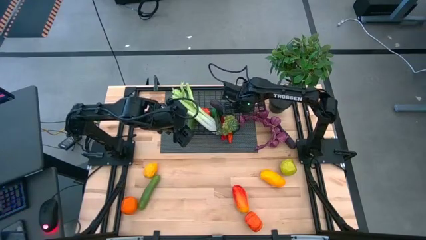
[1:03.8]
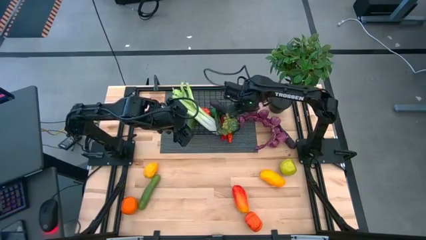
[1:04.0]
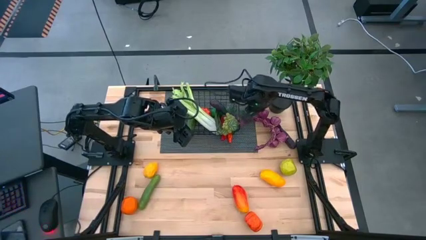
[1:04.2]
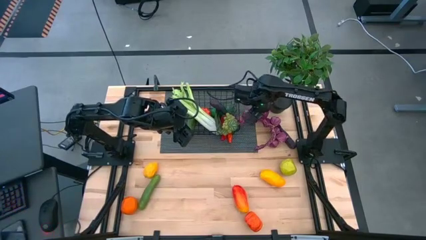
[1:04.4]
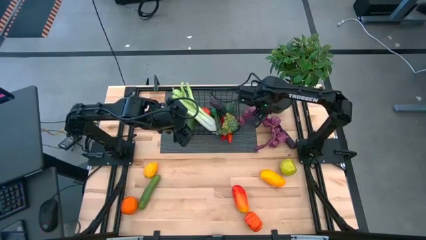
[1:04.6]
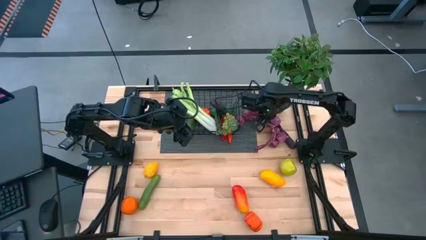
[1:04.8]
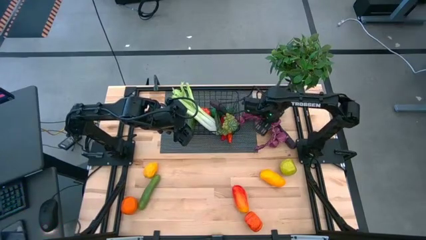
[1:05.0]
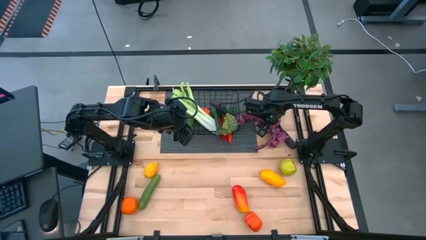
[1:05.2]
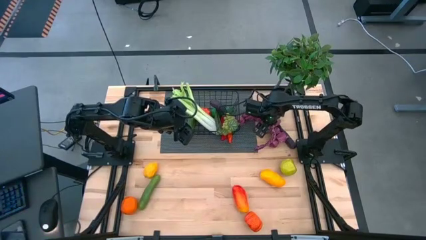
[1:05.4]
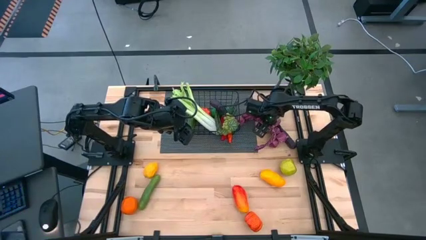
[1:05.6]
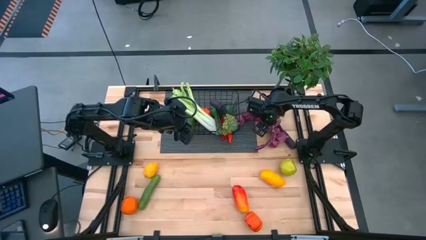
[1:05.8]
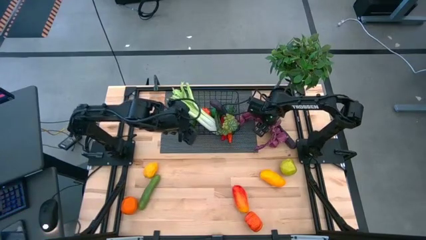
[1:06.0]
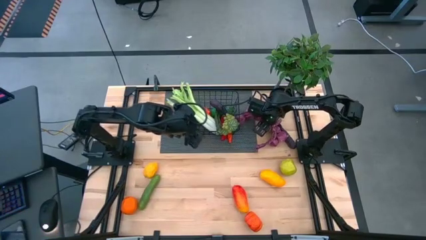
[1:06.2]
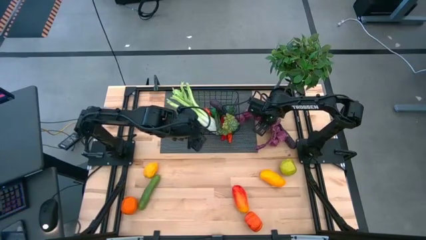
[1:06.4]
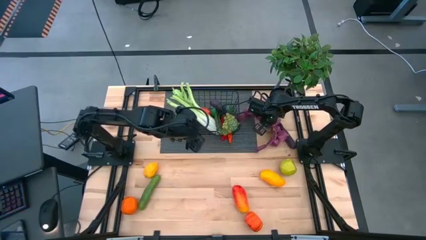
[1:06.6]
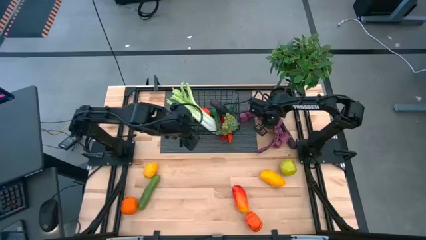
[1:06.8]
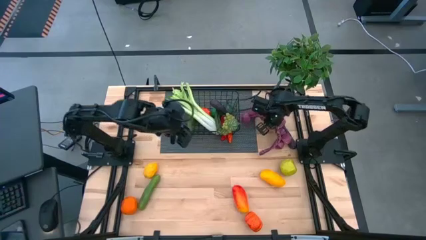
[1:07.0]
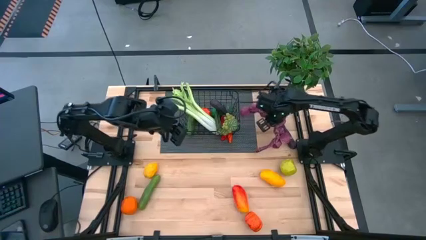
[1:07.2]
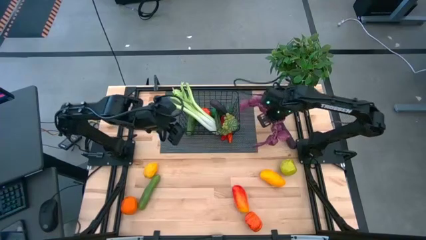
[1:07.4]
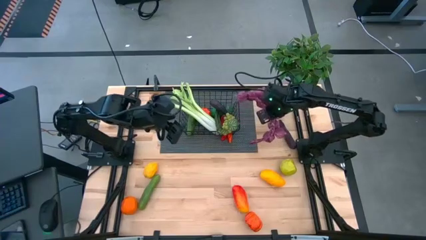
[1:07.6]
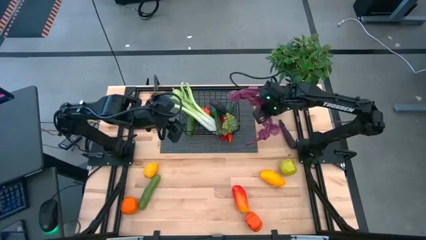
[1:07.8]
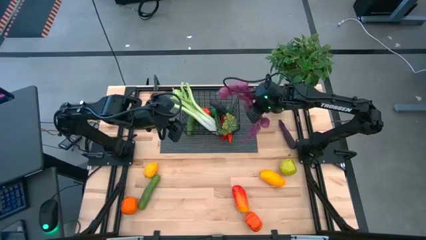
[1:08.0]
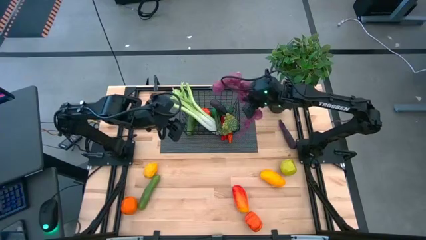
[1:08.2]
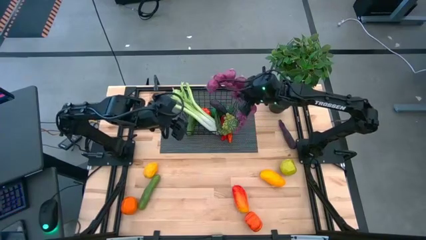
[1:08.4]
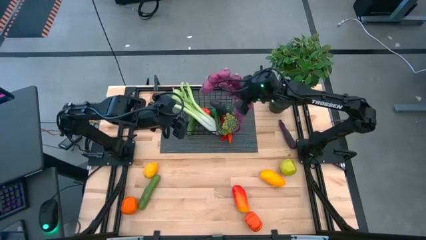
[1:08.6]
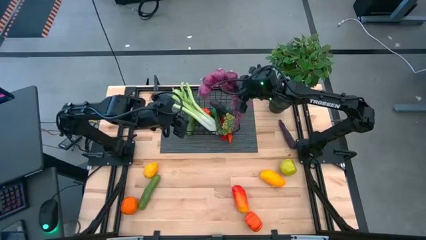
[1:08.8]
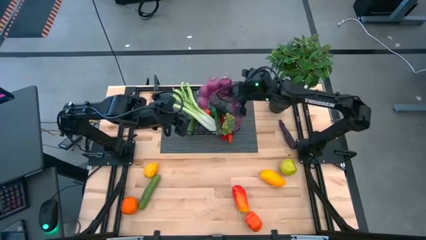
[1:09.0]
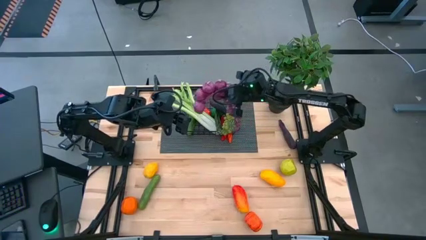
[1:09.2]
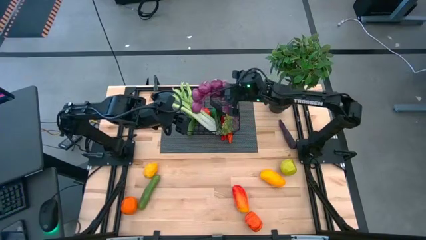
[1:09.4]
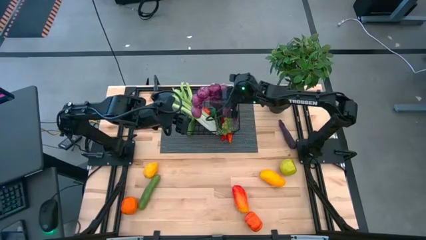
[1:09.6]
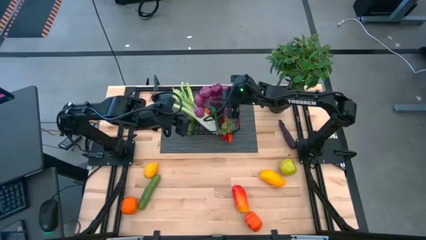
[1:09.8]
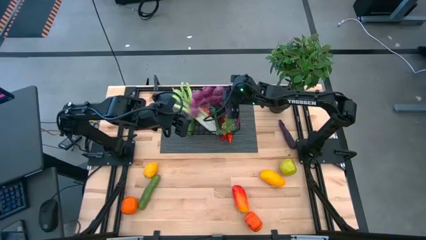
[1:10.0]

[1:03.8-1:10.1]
Task: Build produce basket
Put the purple garlic into the wire basket

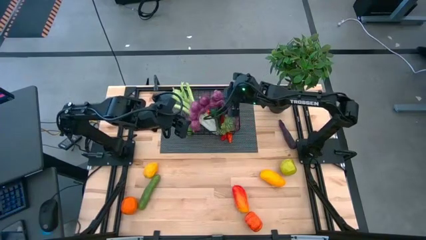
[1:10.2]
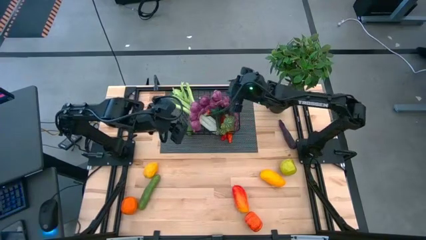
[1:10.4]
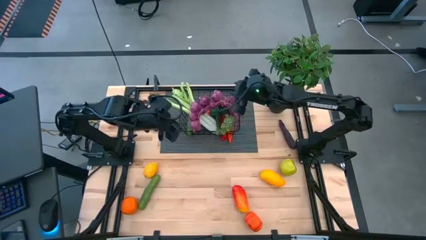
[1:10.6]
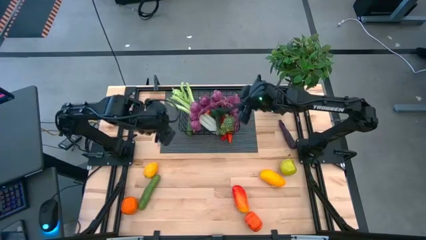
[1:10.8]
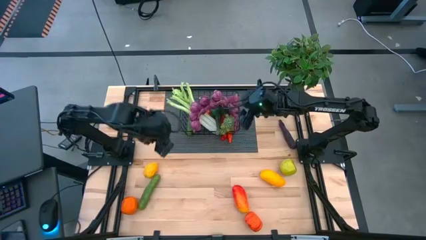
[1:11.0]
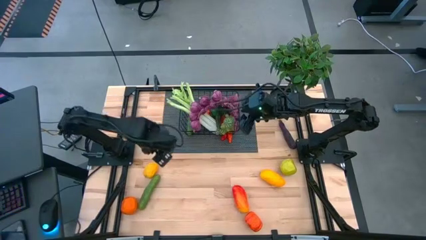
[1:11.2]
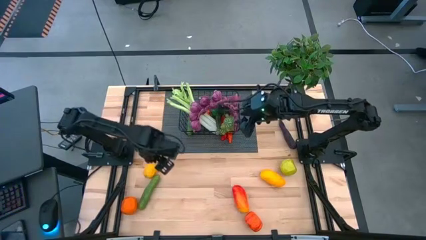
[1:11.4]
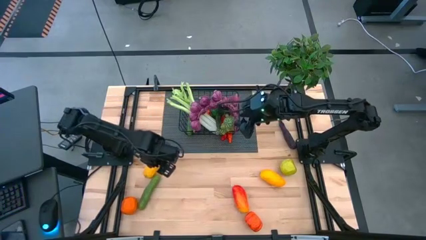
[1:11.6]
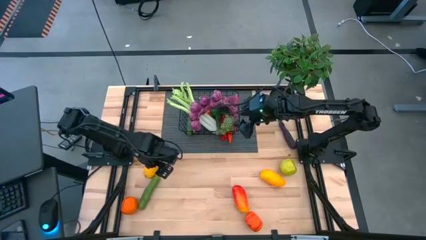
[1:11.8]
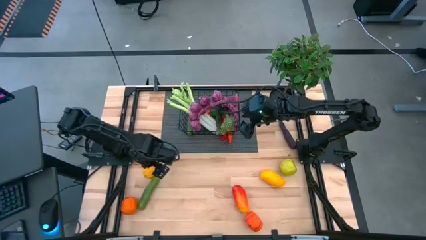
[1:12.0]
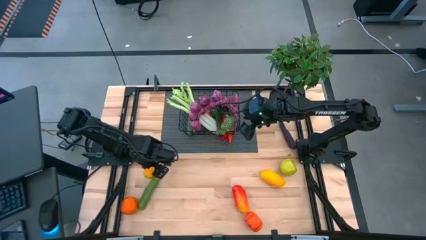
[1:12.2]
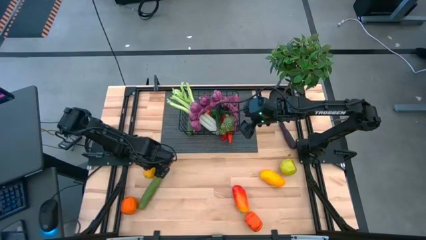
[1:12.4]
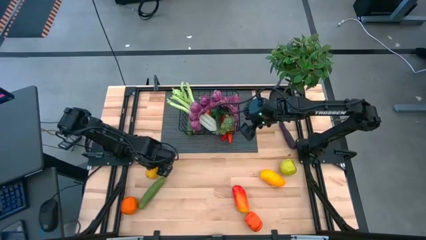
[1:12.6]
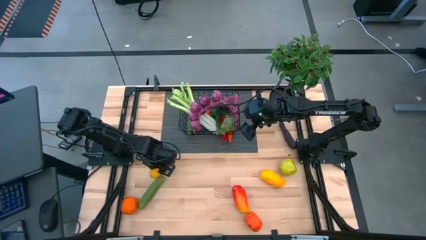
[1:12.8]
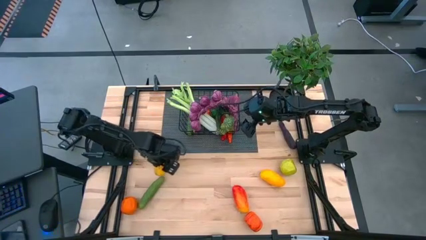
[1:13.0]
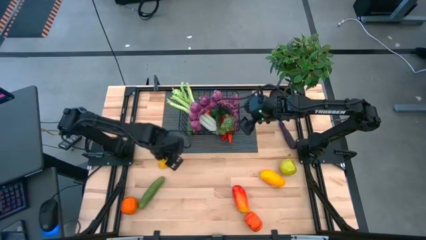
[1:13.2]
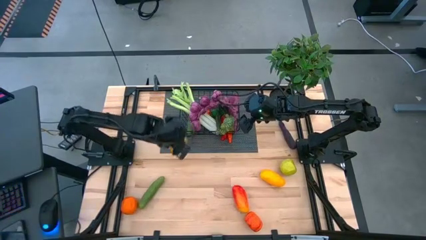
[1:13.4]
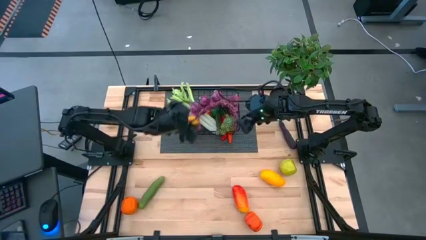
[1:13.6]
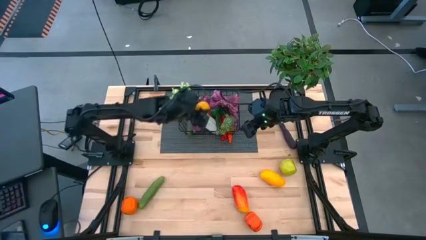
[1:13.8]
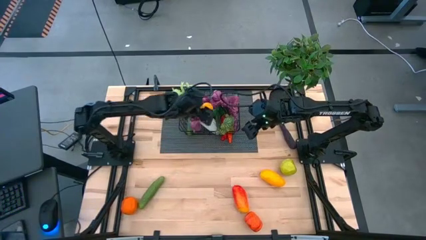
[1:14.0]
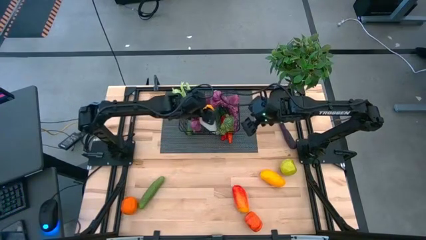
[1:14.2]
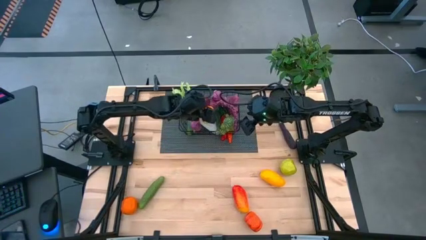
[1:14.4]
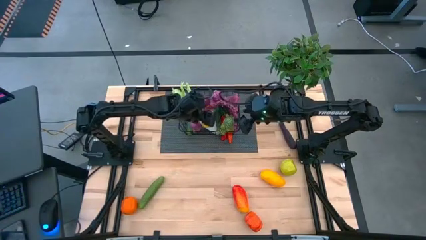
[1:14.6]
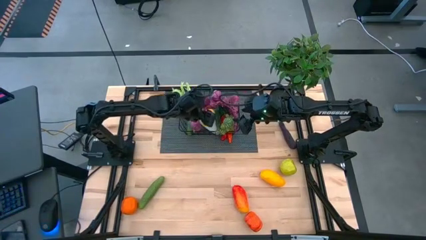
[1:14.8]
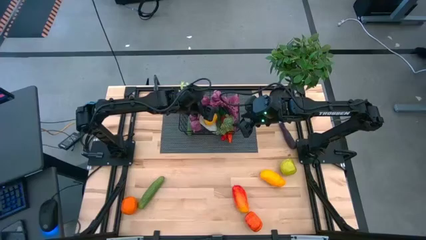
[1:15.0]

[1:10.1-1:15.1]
Put the lemon into the wire basket

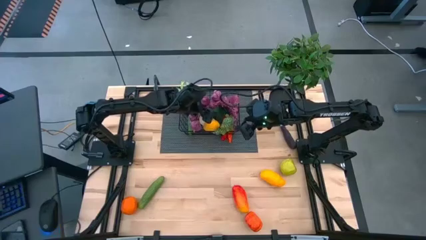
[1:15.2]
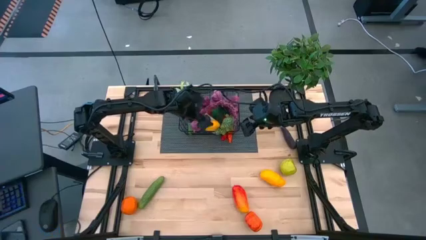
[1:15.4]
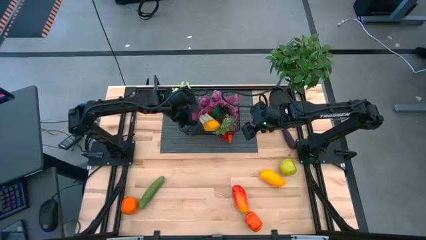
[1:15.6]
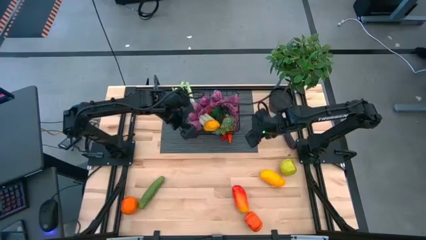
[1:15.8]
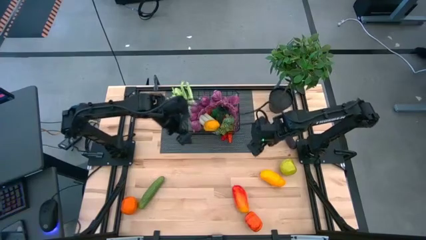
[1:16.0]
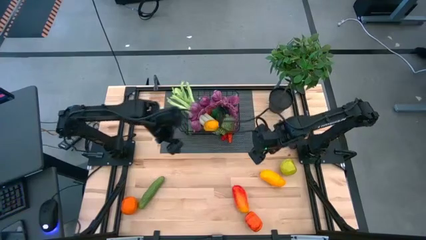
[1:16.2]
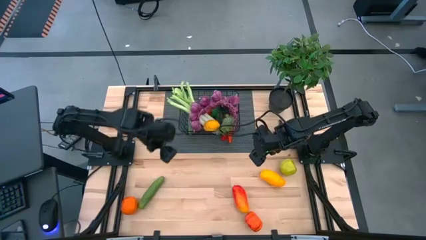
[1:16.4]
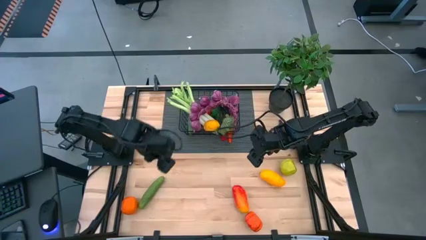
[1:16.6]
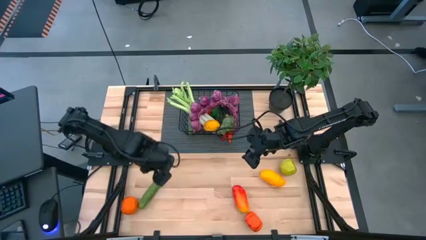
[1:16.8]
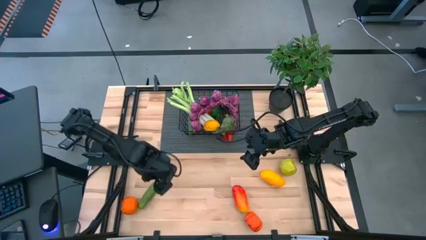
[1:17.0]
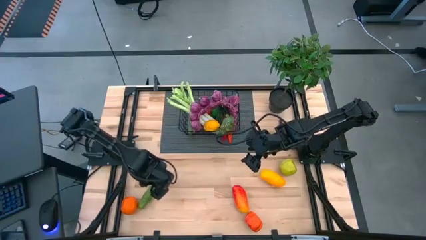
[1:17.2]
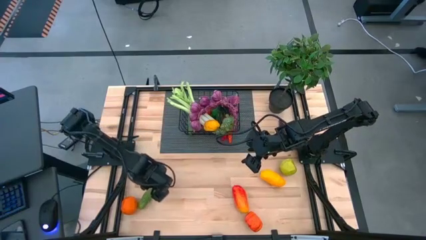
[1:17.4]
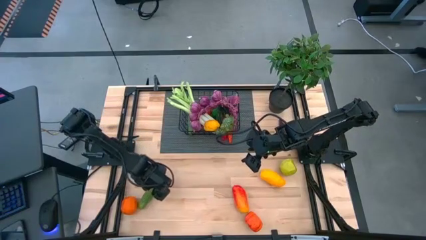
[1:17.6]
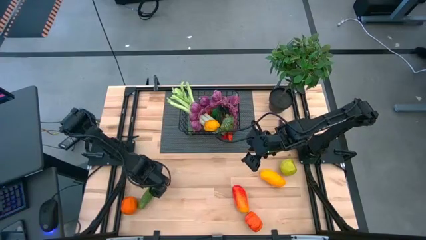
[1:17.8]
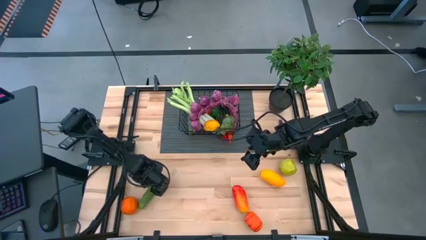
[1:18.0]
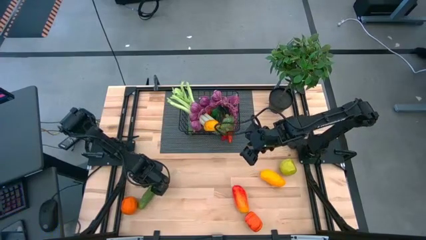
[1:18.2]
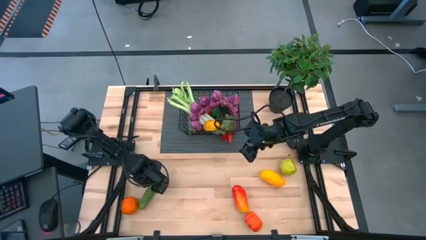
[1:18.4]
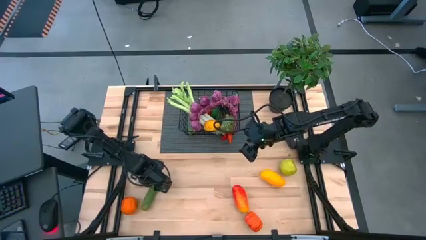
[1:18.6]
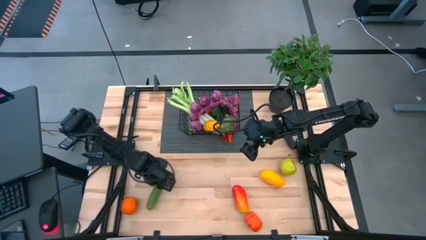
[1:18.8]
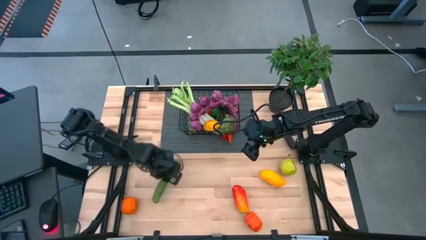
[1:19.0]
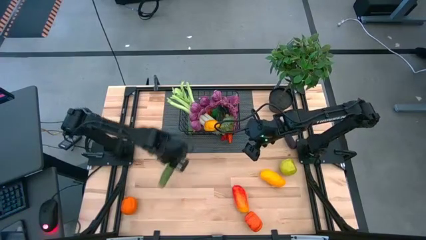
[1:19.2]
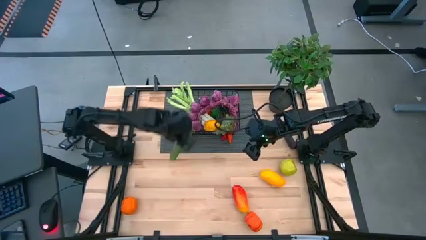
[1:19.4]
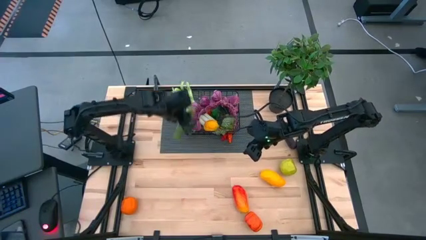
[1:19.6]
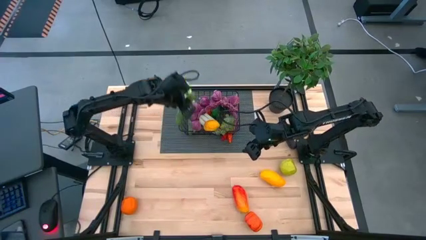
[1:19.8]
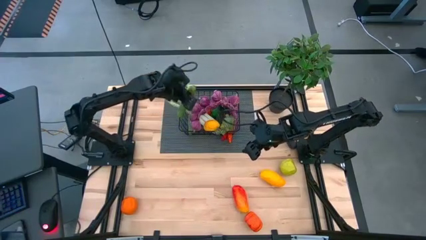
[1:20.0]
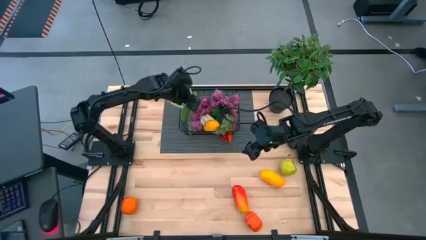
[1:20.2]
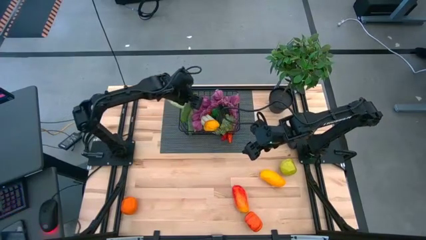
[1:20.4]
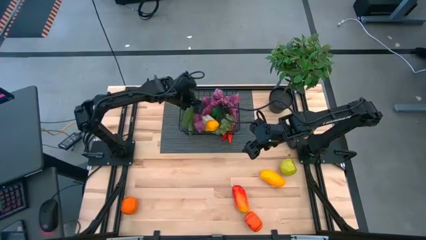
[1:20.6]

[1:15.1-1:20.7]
Put the cucumber into the wire basket

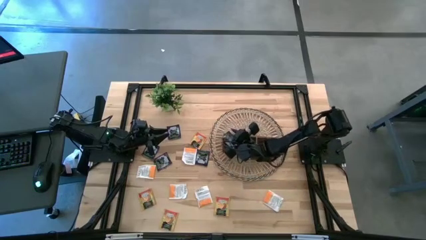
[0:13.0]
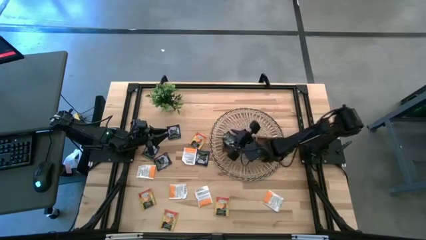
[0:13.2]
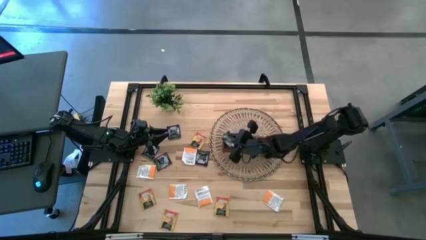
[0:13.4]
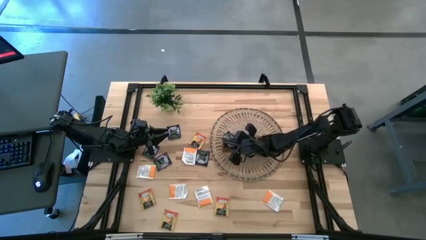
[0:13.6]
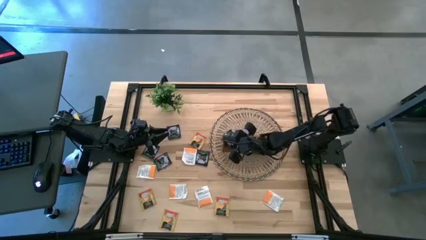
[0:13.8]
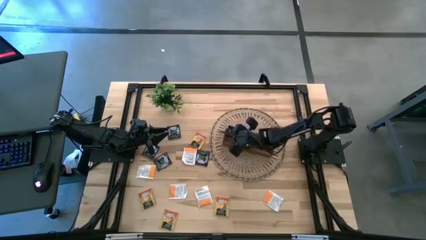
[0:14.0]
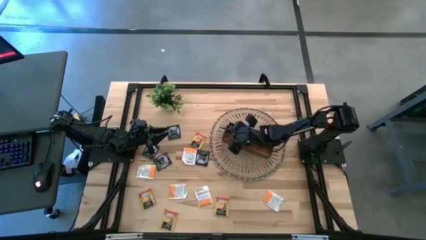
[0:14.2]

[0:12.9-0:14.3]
Task: Pick & Place Tea
Adjust the wooden organizer
